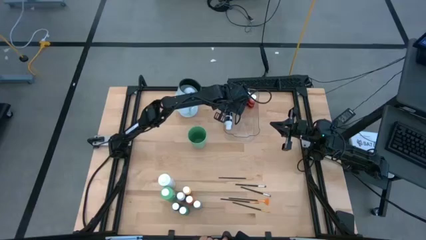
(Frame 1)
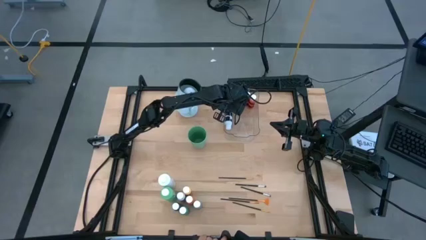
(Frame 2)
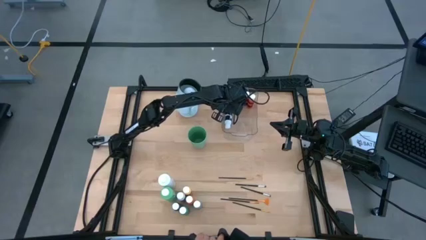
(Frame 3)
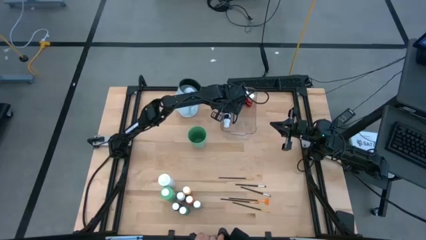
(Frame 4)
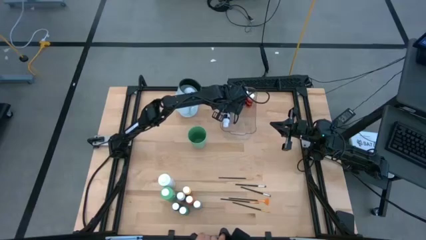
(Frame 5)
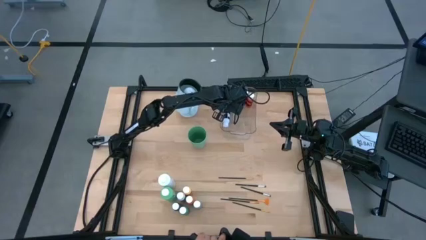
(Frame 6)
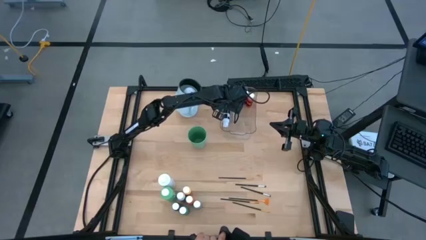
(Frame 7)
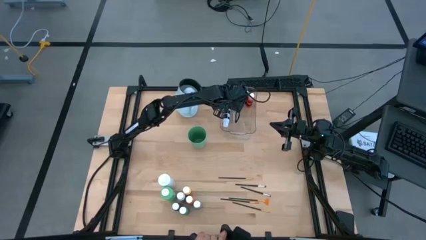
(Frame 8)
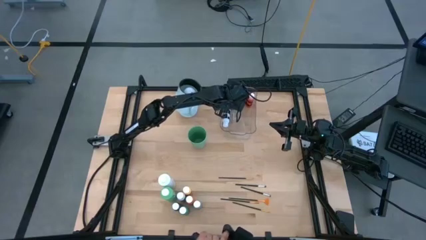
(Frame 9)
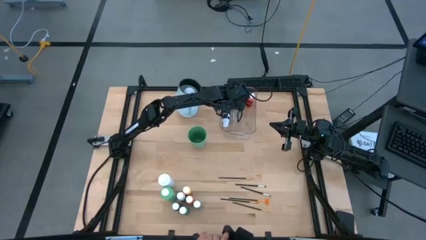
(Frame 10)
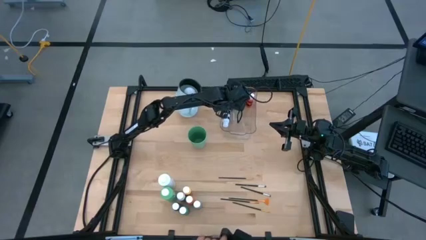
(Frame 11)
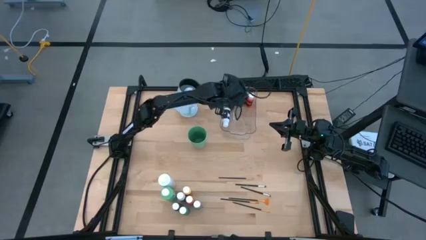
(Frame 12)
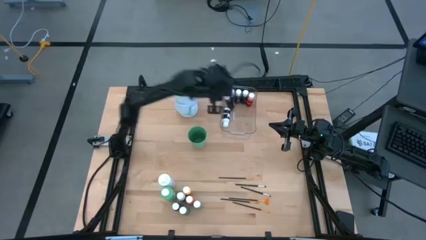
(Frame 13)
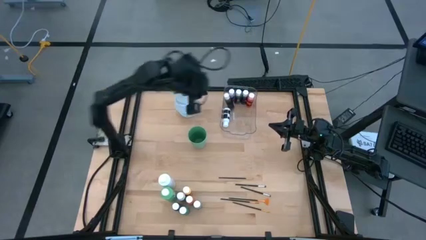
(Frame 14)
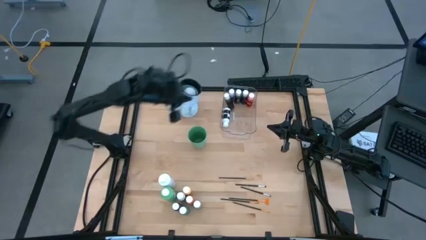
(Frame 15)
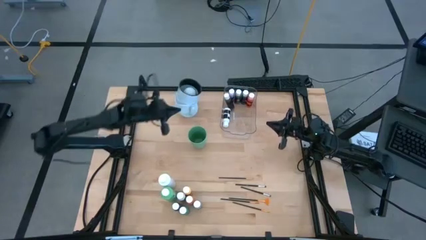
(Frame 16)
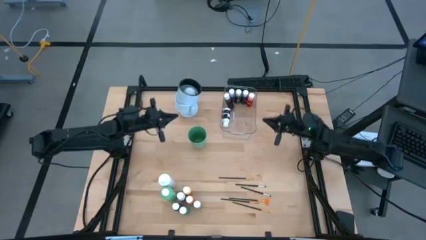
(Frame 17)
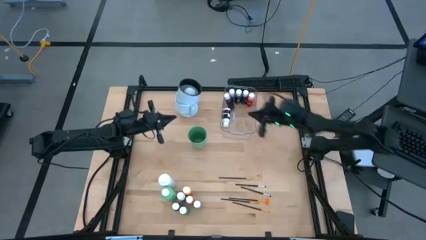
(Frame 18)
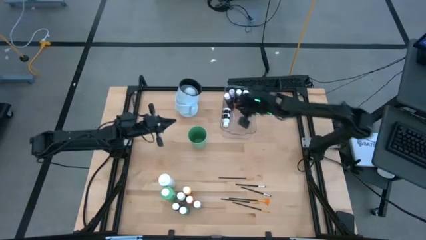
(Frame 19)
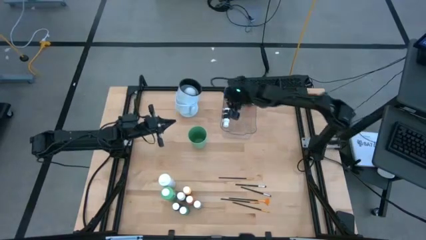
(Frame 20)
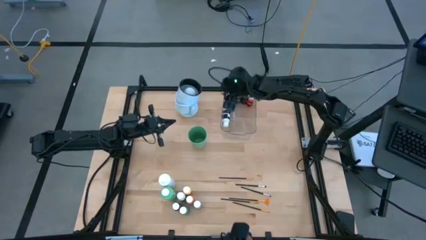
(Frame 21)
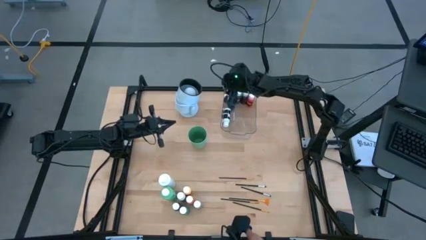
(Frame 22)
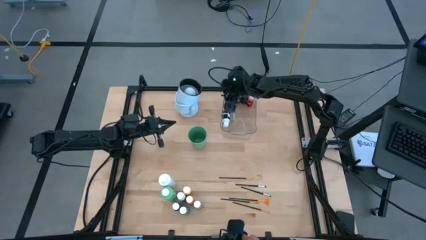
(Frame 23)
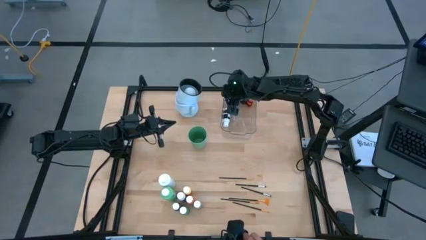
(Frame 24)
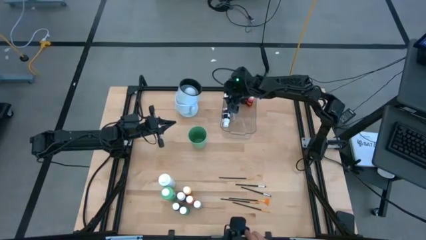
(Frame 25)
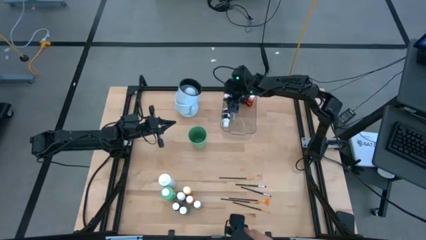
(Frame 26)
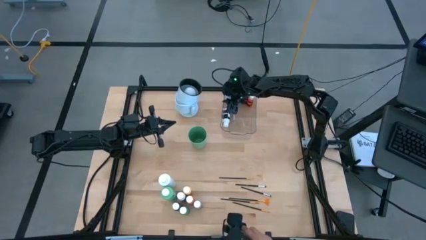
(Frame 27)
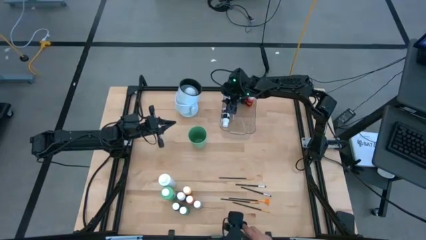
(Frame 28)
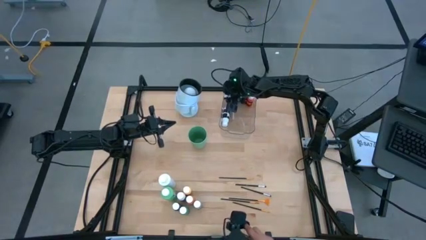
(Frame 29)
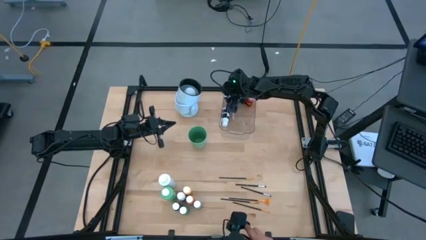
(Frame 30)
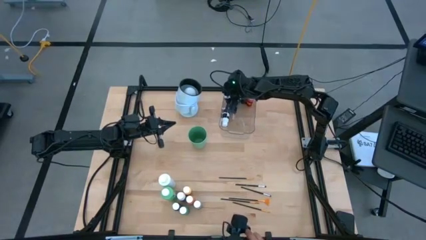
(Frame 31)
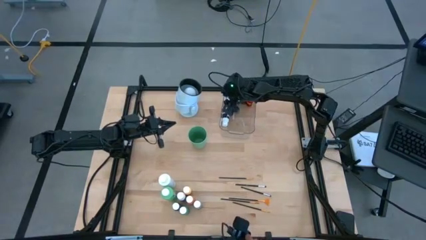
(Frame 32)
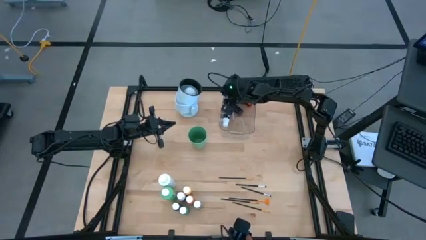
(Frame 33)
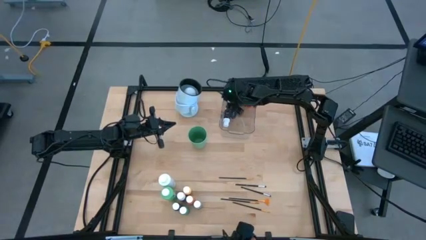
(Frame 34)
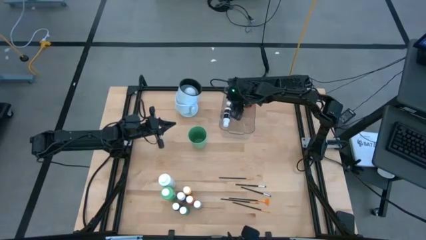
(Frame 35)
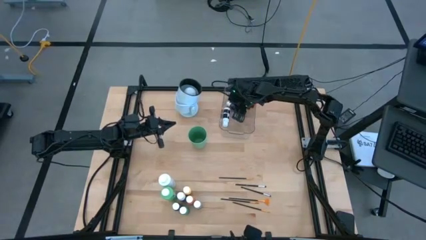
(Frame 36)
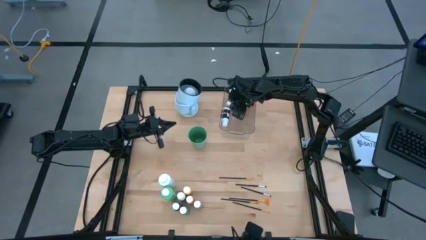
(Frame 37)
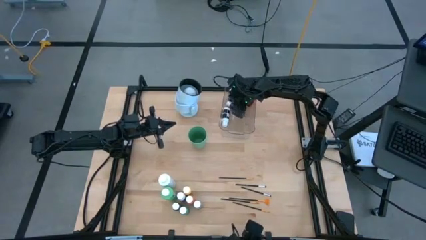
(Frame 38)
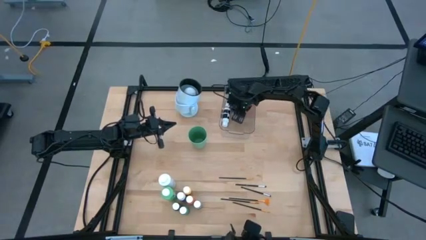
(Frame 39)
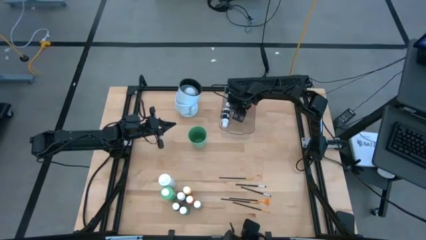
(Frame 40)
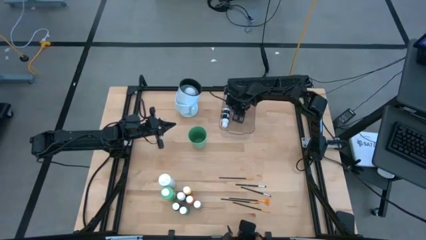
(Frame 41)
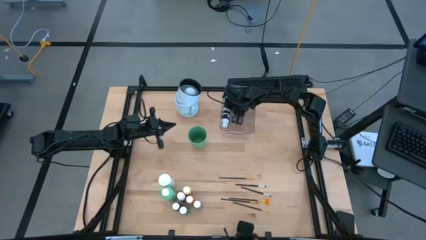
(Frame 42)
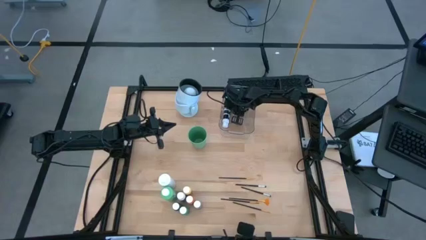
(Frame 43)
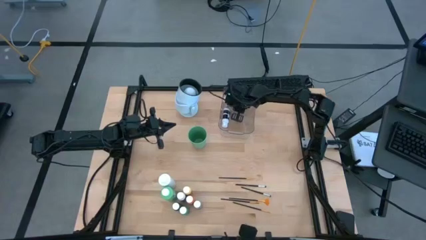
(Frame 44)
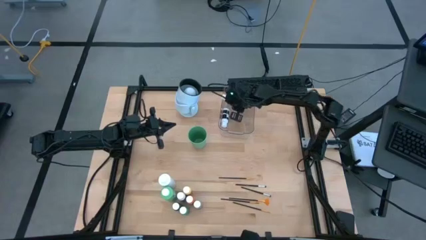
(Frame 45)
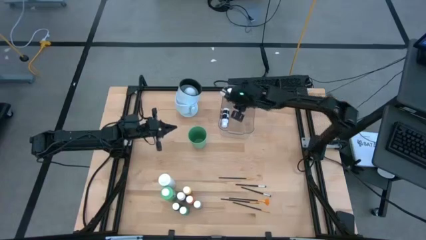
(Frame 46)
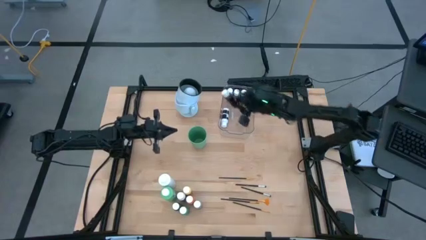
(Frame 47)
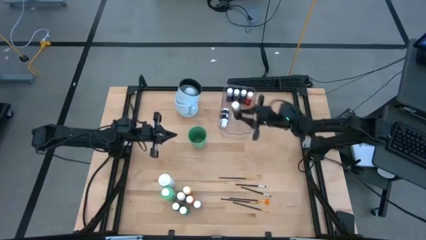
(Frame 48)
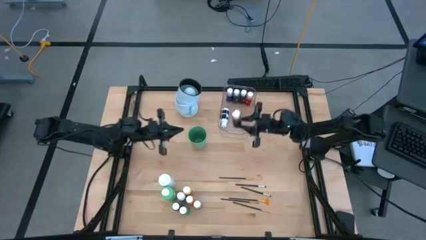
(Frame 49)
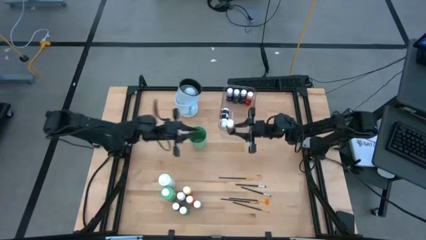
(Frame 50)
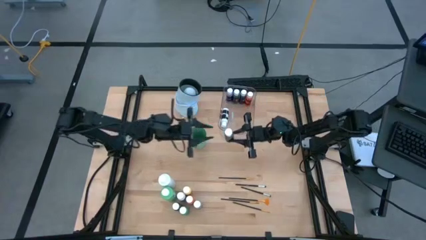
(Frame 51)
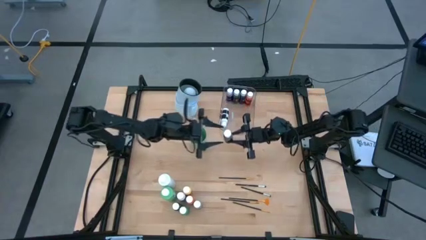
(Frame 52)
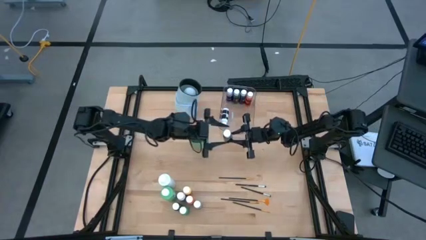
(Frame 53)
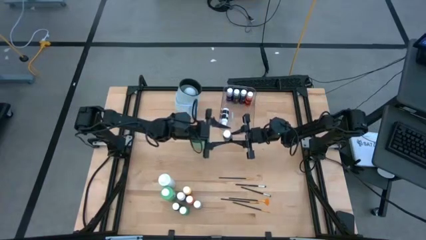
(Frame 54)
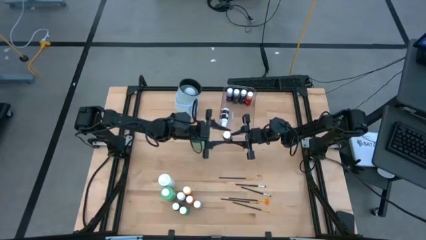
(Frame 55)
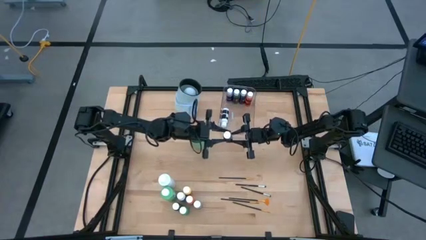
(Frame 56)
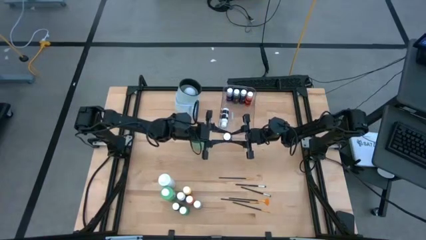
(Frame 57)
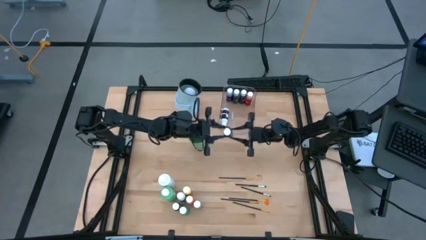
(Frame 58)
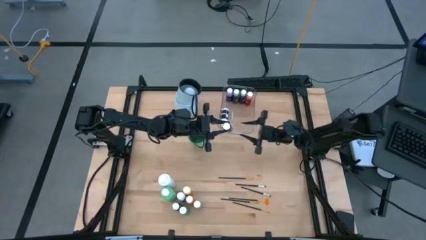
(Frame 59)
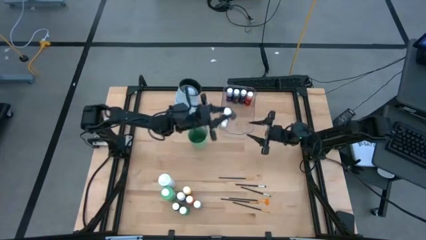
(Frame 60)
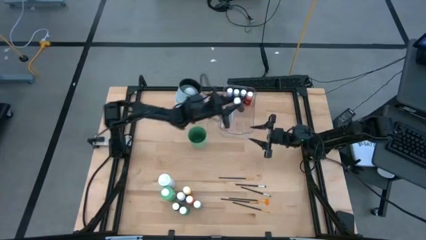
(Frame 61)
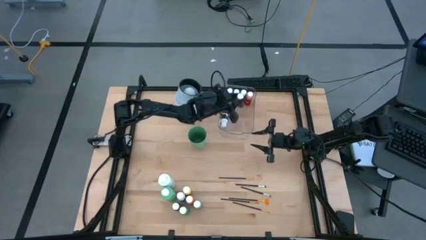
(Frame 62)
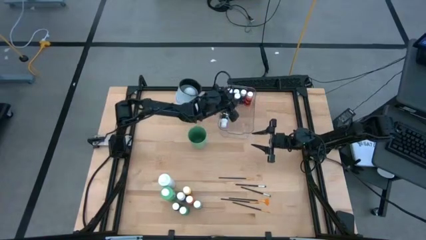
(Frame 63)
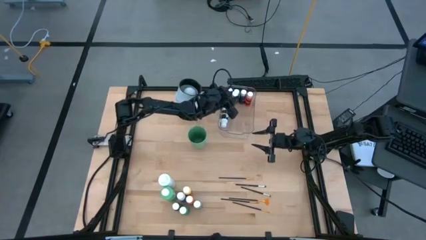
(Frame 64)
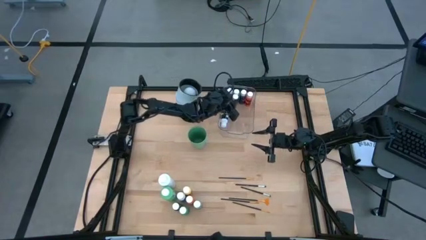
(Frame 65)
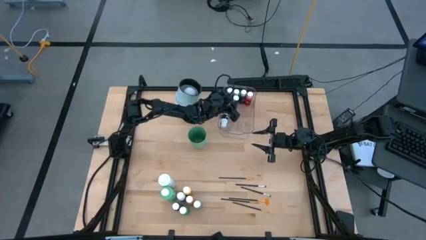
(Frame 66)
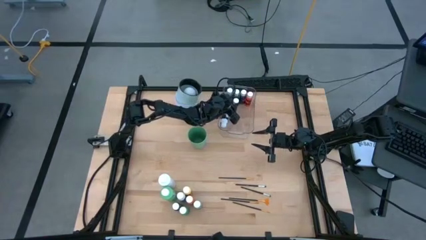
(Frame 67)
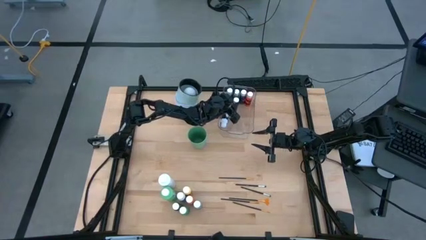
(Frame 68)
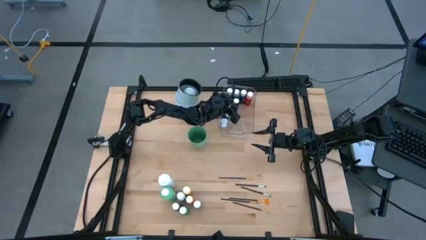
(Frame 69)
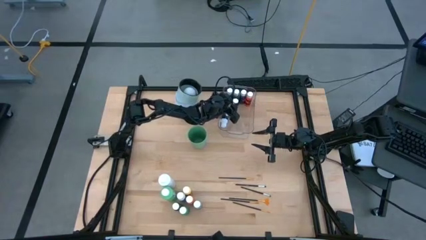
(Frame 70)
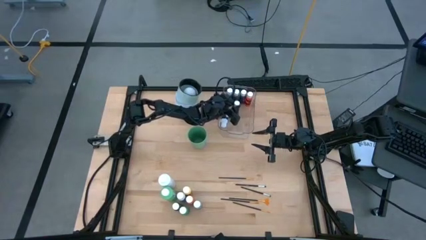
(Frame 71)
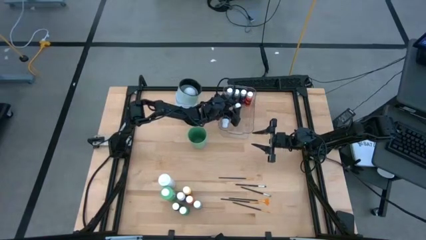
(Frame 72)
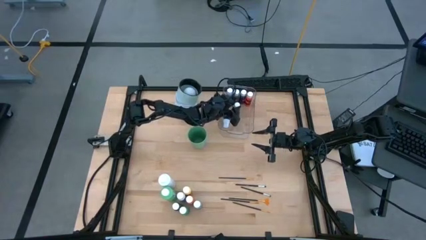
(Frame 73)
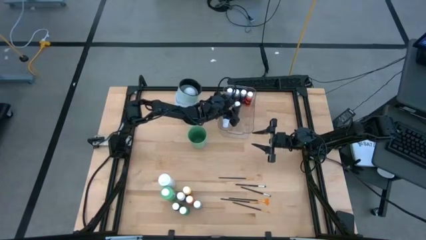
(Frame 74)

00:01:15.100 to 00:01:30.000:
Task: Pick & Place Paint Supplies
Put the brown paint bottle into the transparent bin
